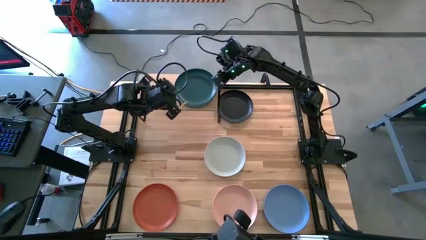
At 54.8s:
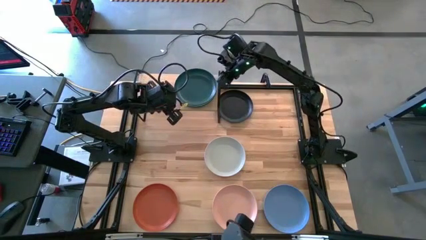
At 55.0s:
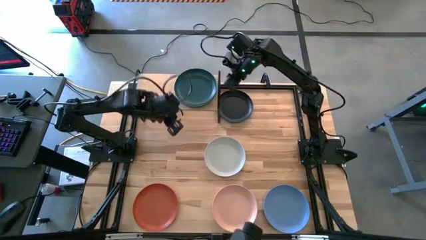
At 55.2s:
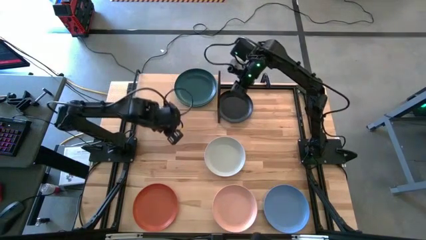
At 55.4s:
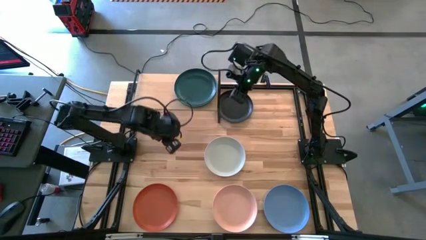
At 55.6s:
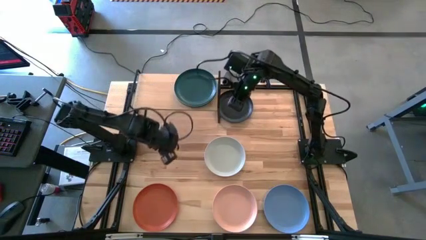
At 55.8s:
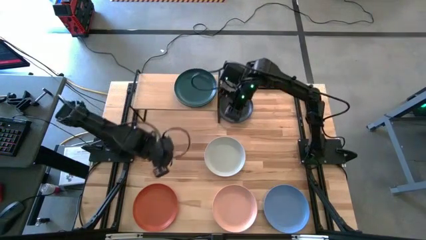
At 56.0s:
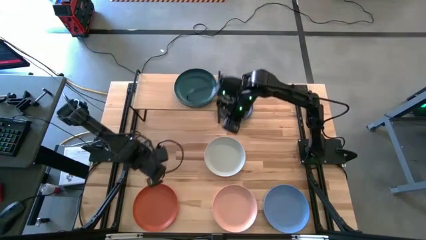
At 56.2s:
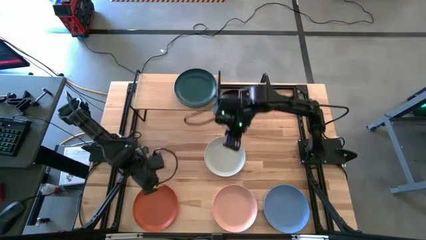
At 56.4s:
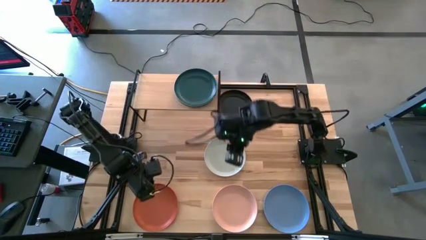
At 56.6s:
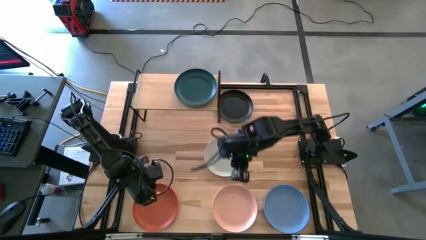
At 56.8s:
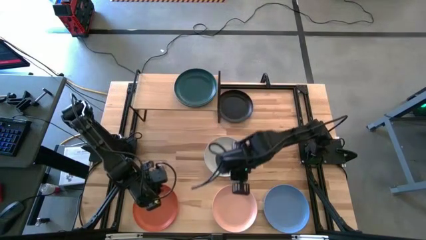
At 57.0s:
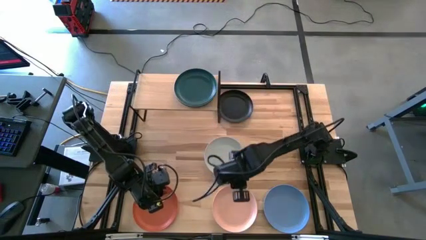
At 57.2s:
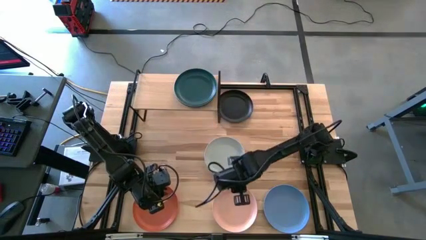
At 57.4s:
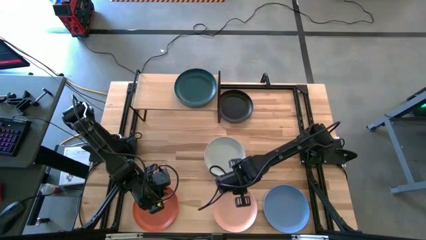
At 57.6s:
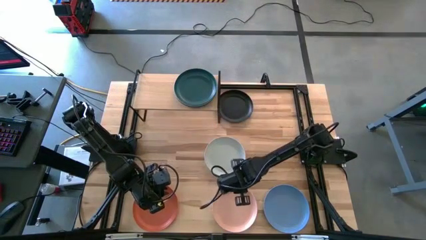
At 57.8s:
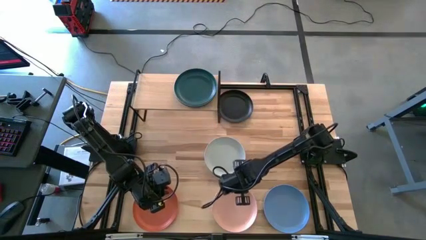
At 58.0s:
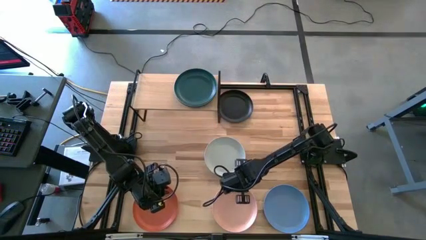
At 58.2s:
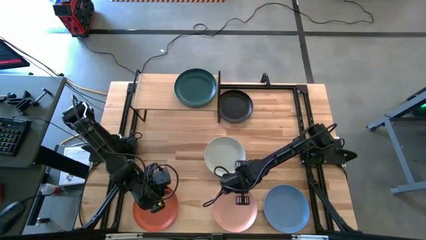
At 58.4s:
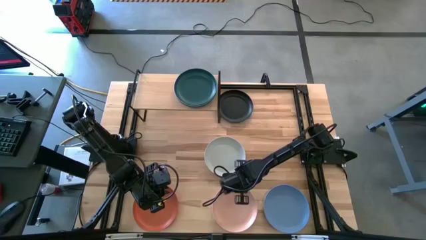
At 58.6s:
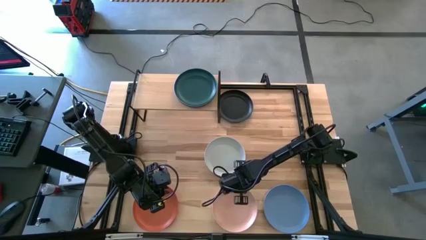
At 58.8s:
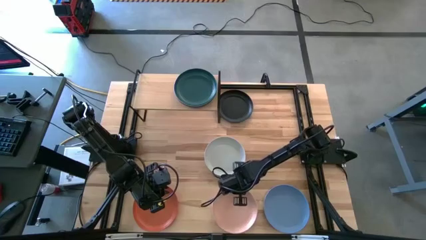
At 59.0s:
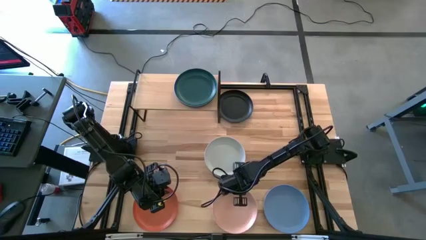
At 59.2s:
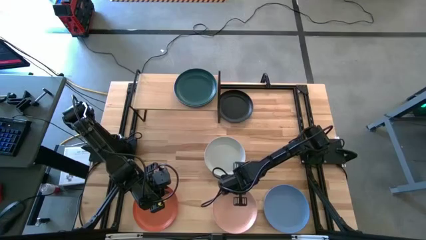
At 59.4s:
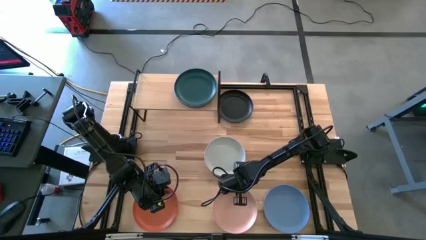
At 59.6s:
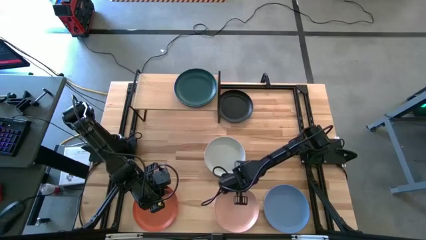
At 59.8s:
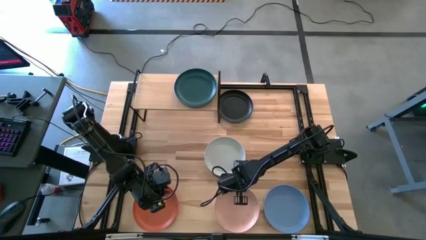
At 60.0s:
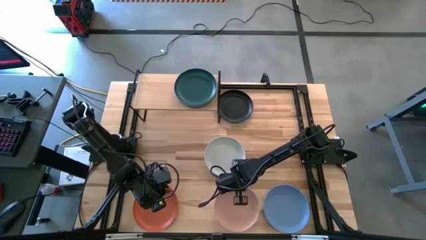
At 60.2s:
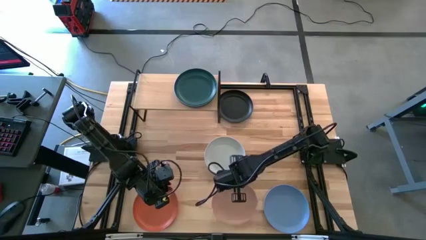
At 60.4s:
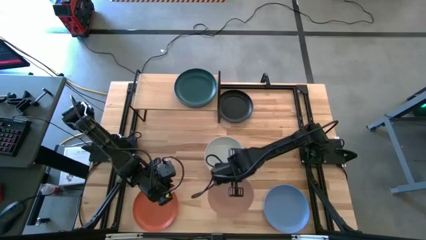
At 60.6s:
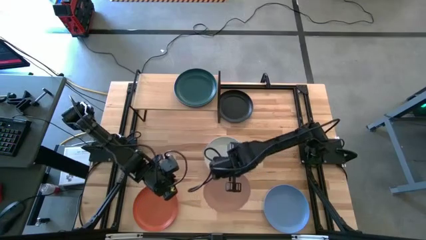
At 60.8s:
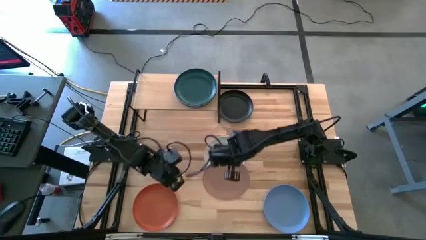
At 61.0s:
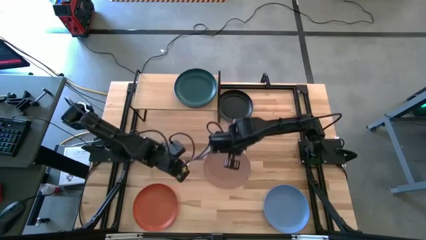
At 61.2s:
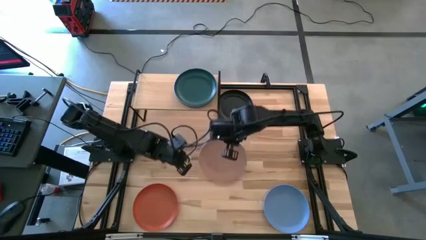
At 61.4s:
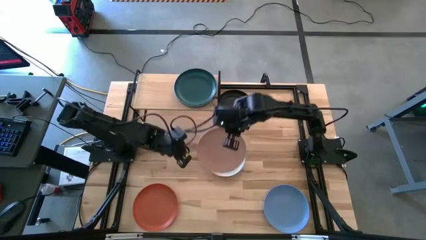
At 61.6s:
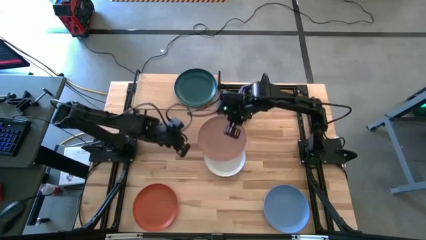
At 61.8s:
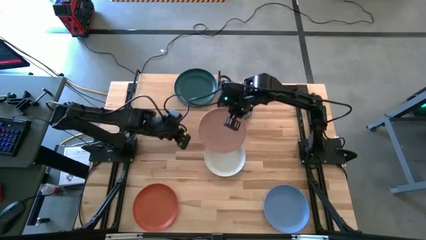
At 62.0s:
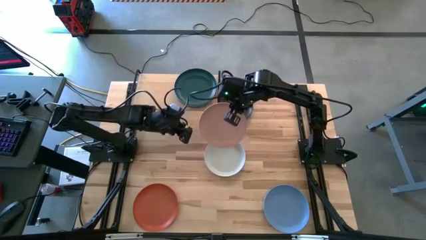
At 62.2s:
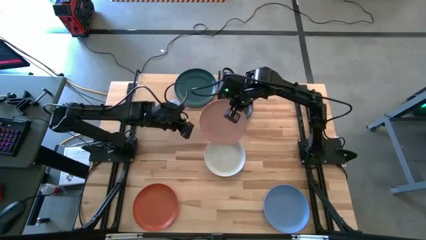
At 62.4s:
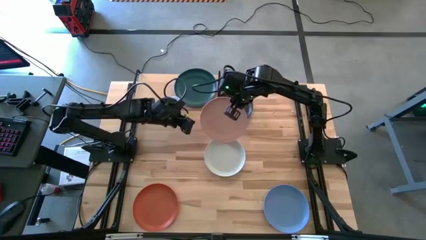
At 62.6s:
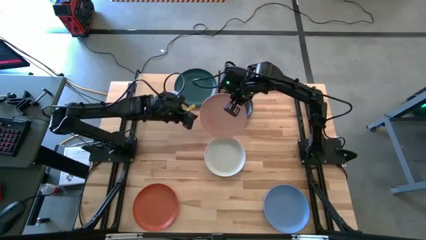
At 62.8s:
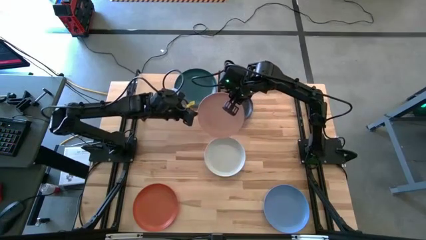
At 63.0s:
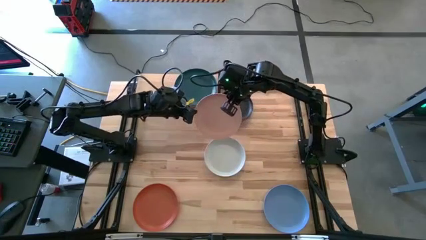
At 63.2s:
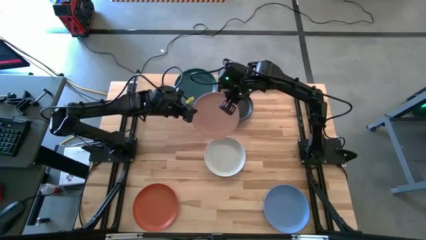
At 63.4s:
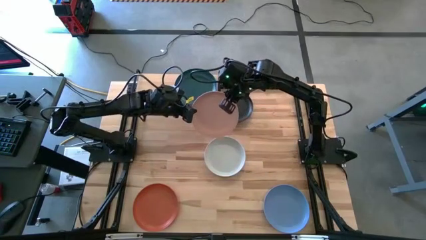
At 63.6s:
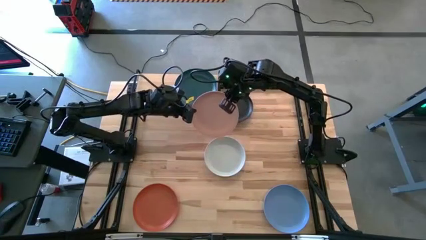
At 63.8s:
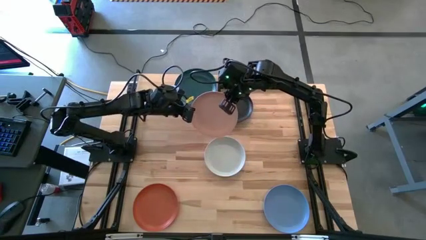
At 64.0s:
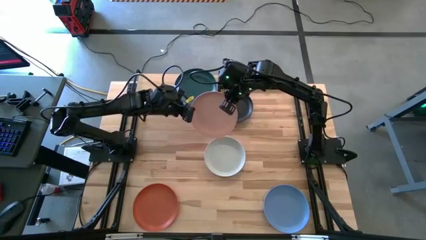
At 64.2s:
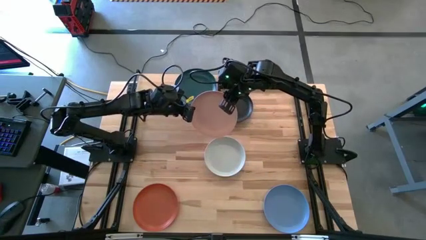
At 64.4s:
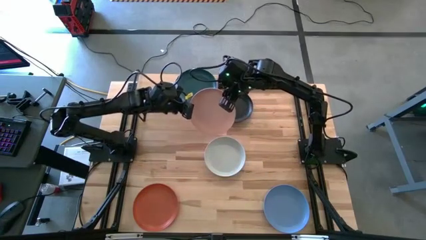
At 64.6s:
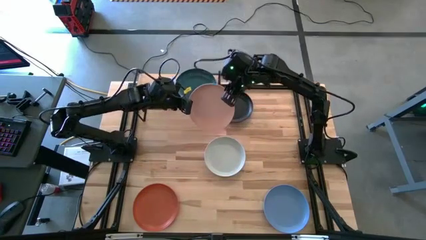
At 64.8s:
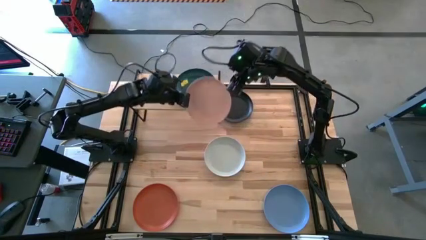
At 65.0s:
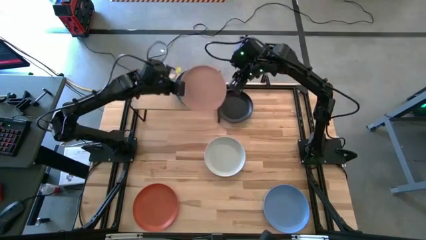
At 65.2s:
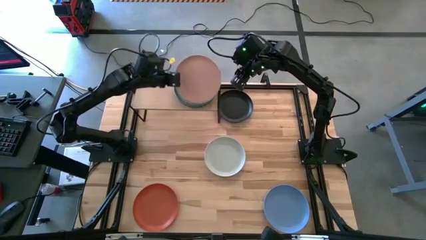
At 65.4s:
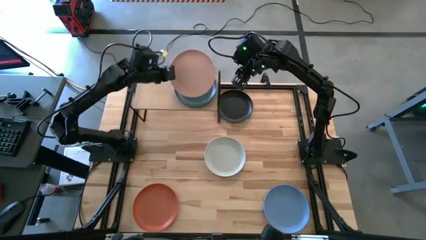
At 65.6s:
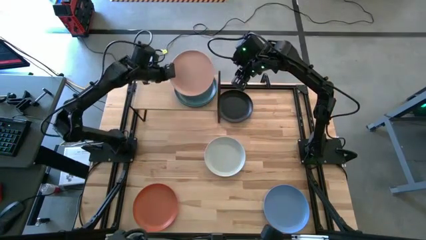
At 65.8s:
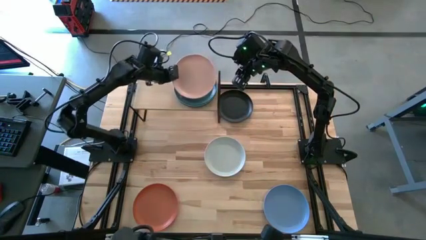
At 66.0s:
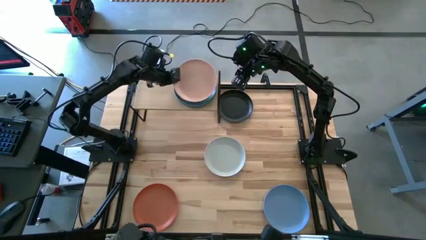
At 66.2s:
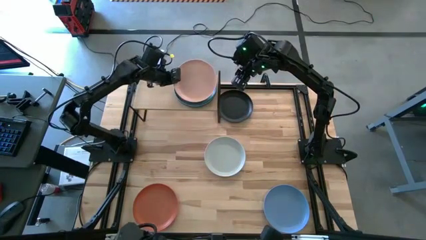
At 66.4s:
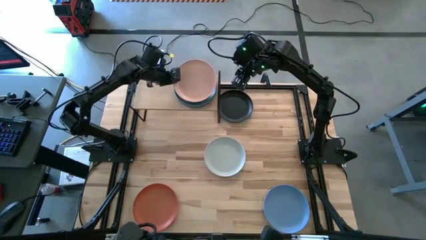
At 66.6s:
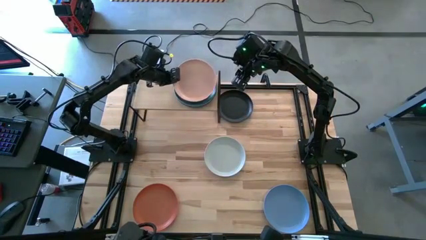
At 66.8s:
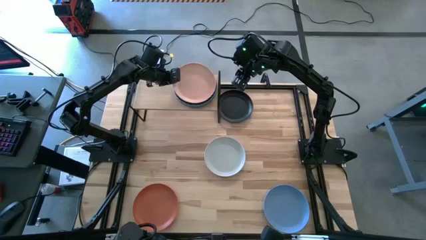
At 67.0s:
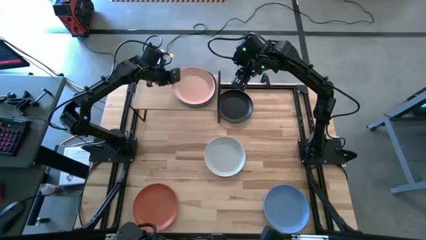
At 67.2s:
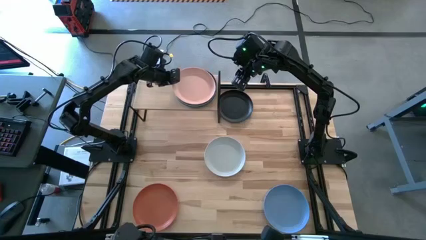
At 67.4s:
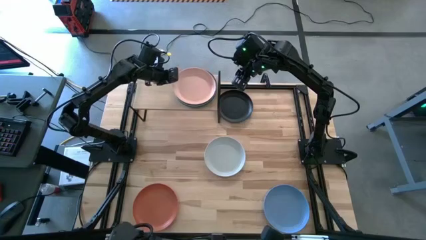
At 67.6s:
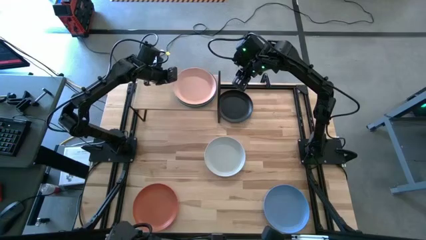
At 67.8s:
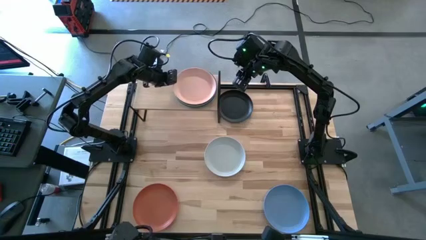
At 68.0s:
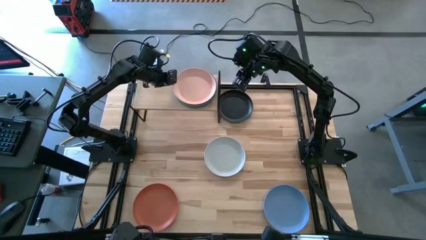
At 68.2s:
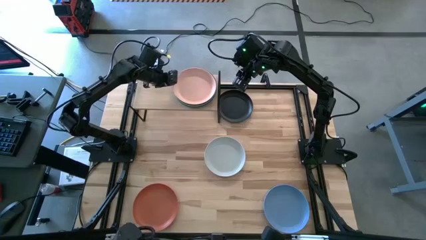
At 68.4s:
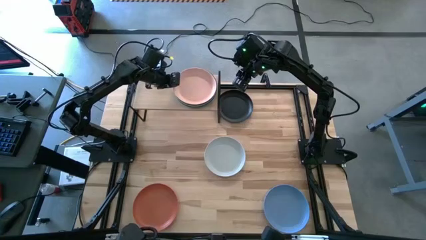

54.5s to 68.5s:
Task: Place and stack plates onto a shelf
Stack the pink plate on top of the dark green plate on the shelf
